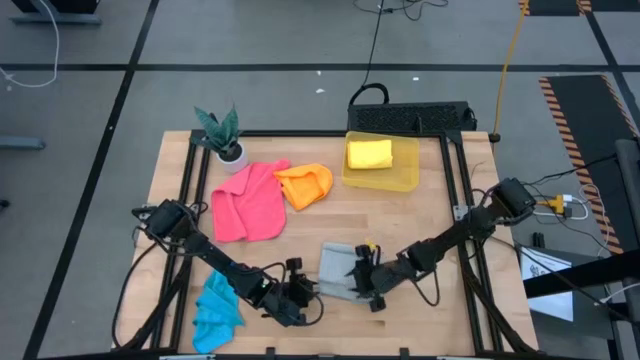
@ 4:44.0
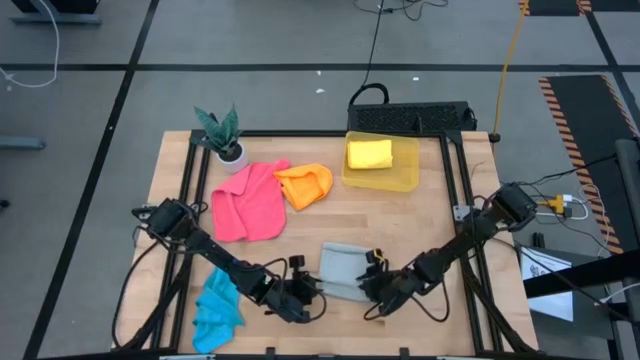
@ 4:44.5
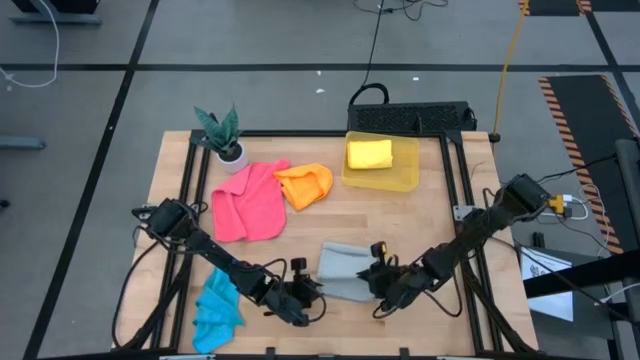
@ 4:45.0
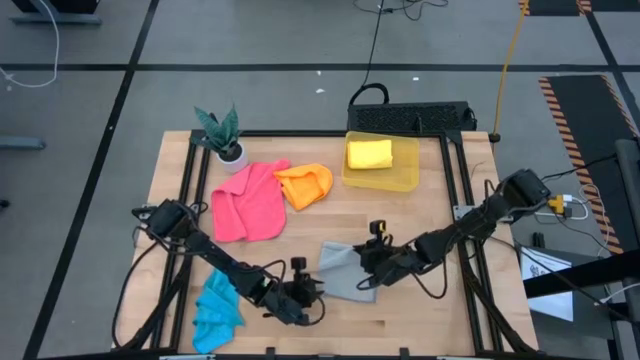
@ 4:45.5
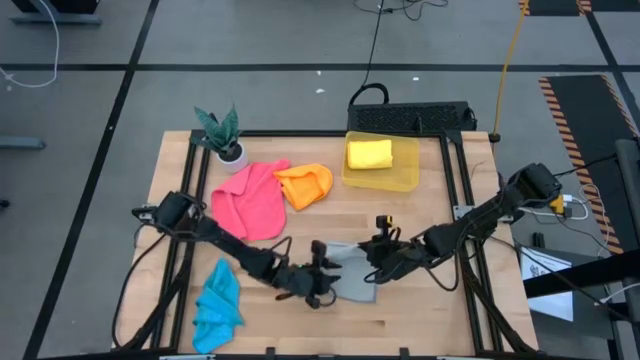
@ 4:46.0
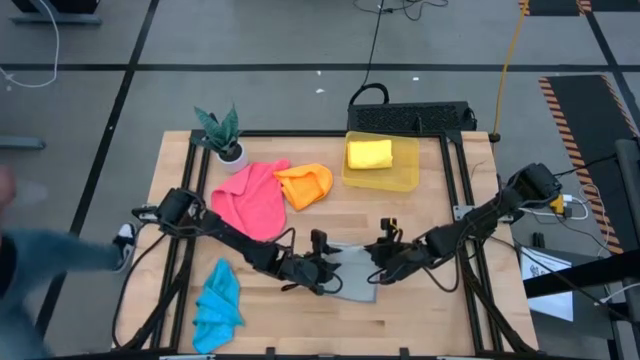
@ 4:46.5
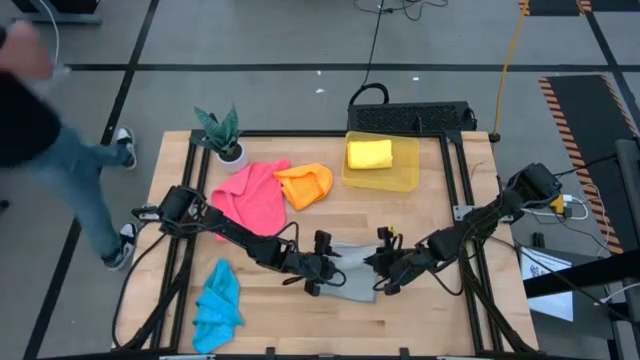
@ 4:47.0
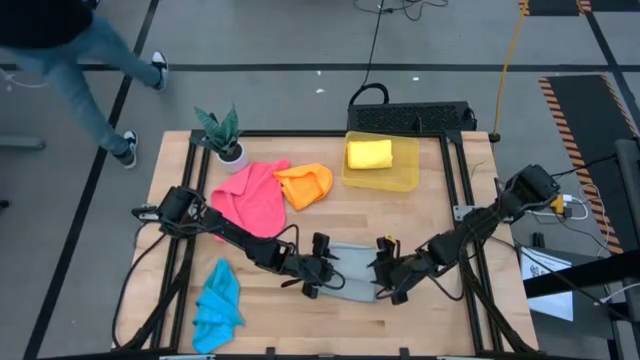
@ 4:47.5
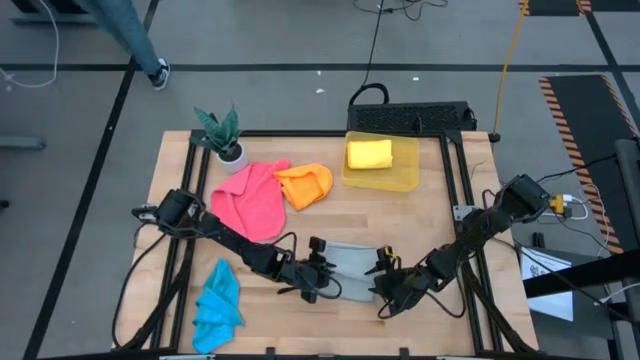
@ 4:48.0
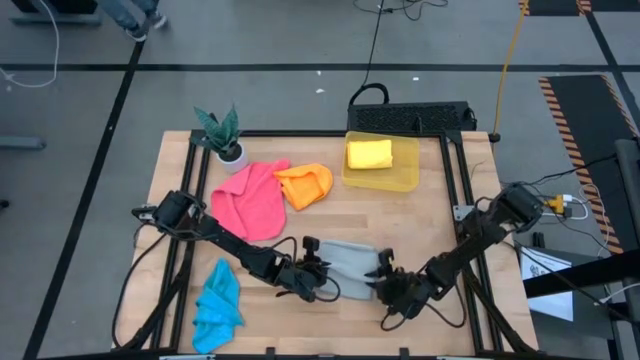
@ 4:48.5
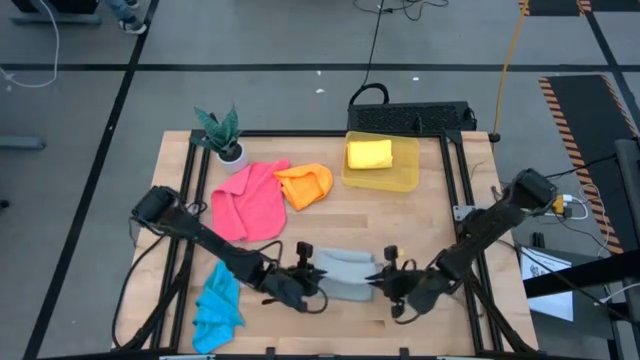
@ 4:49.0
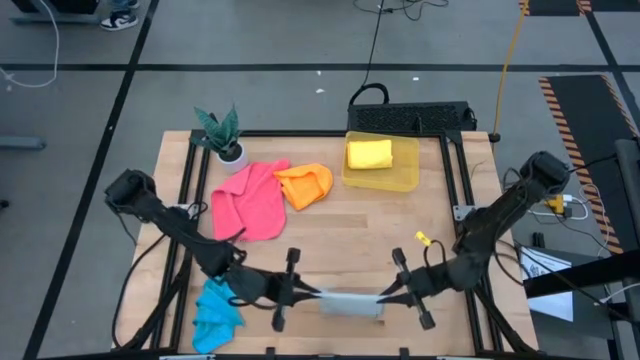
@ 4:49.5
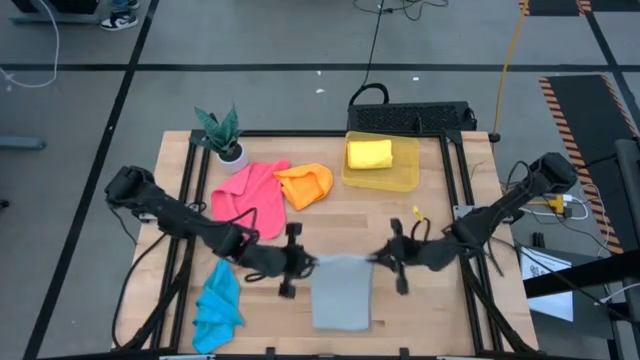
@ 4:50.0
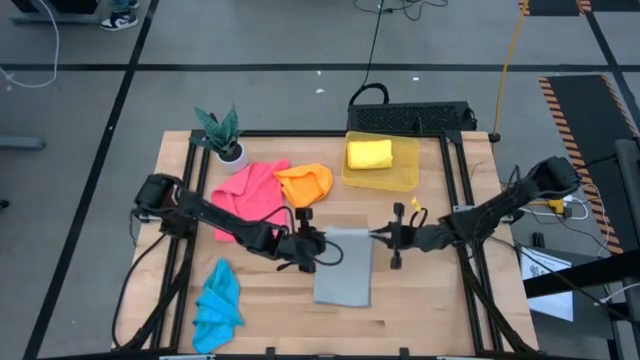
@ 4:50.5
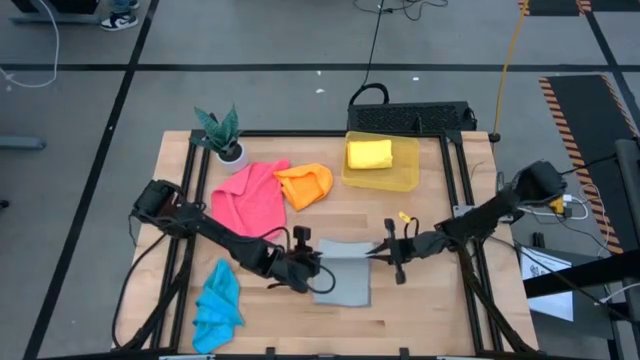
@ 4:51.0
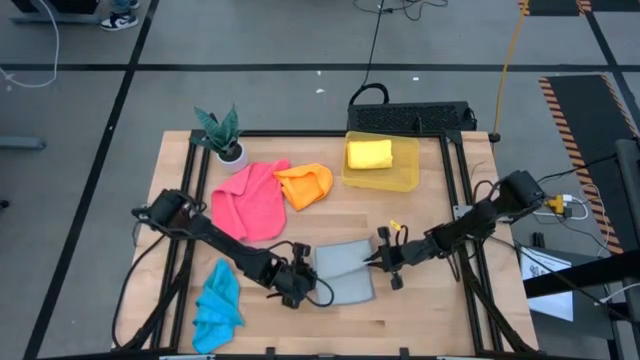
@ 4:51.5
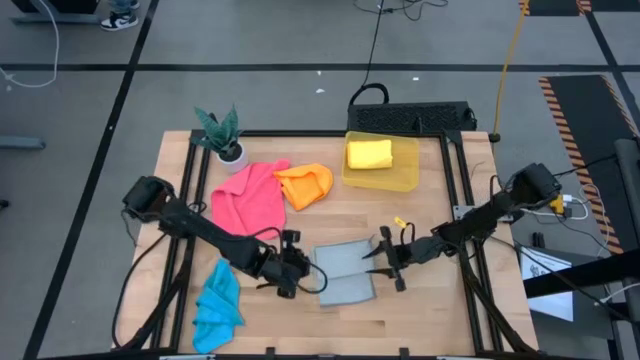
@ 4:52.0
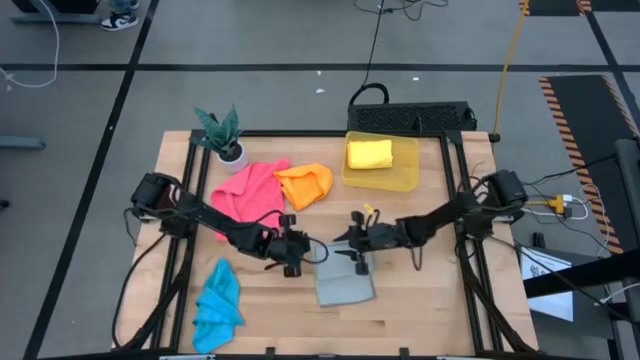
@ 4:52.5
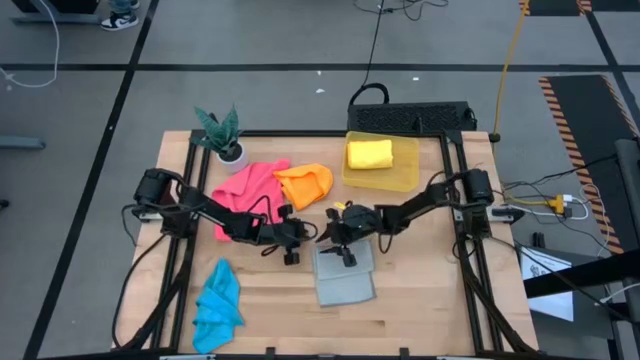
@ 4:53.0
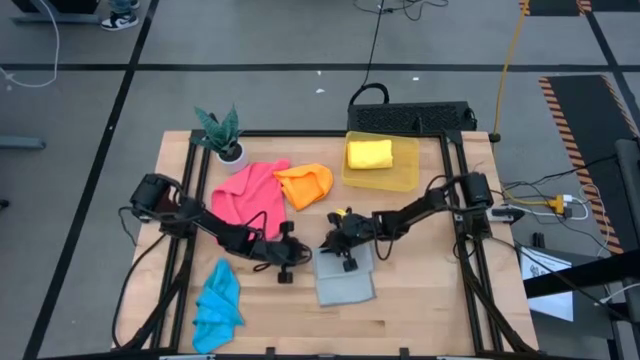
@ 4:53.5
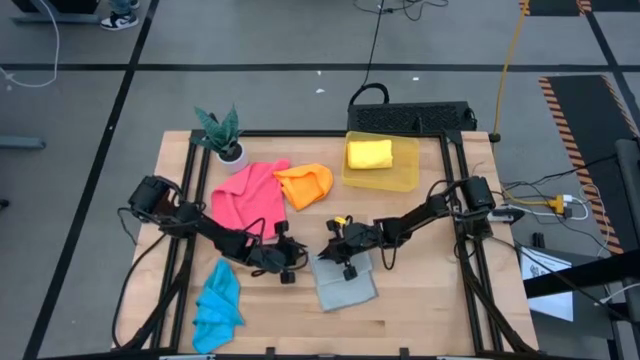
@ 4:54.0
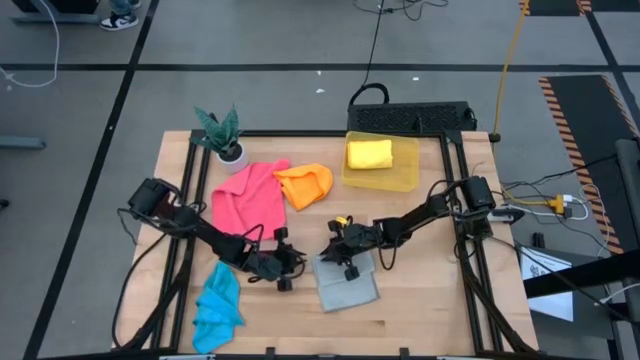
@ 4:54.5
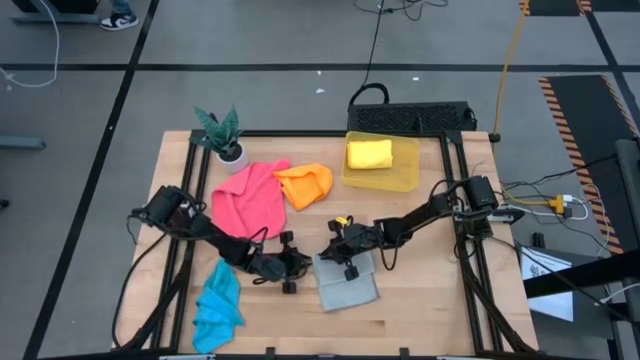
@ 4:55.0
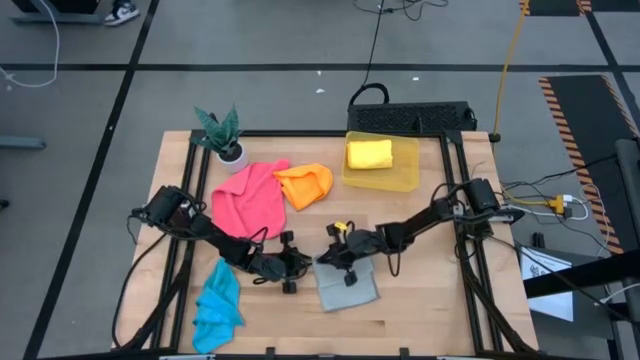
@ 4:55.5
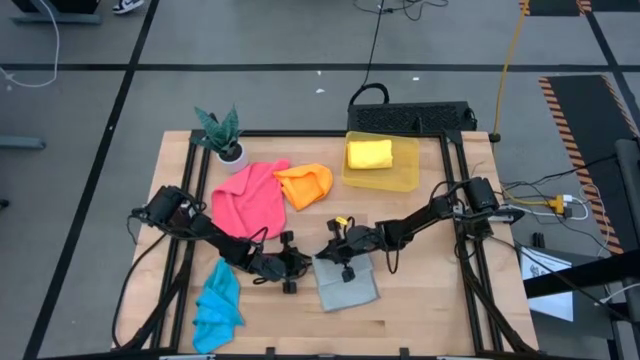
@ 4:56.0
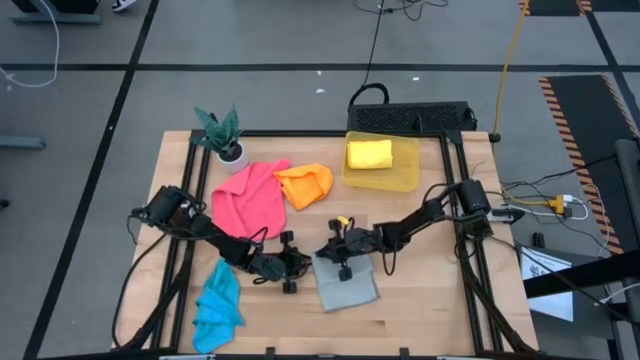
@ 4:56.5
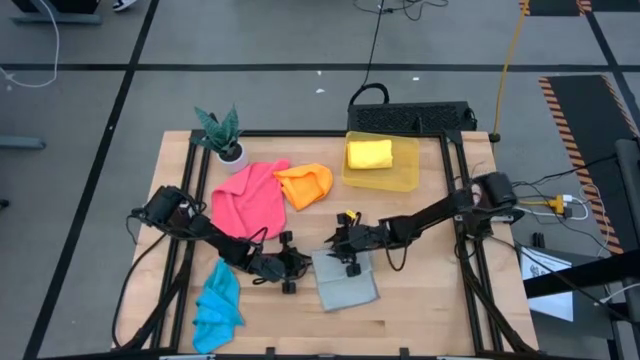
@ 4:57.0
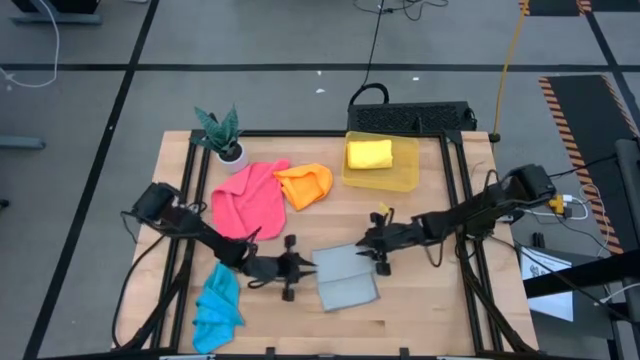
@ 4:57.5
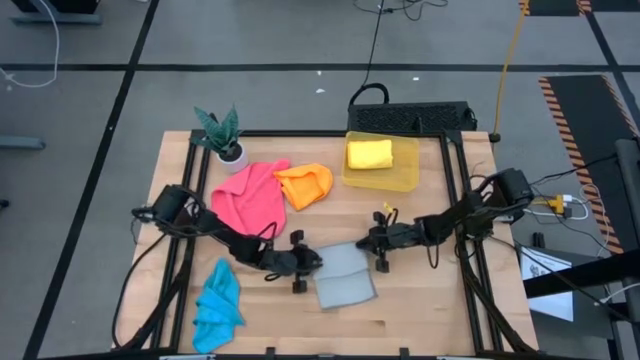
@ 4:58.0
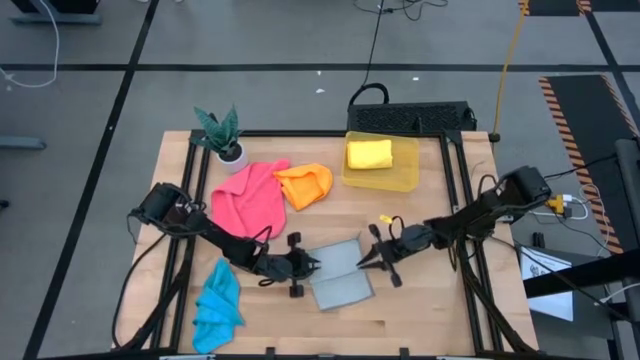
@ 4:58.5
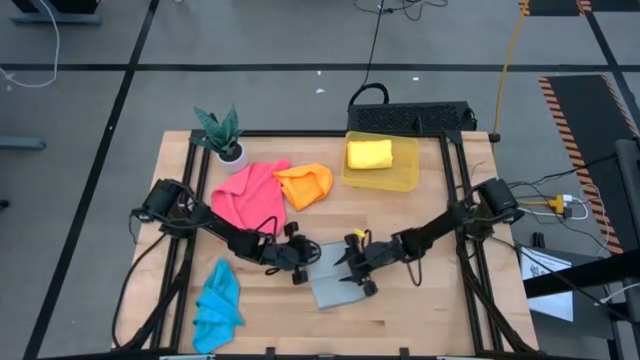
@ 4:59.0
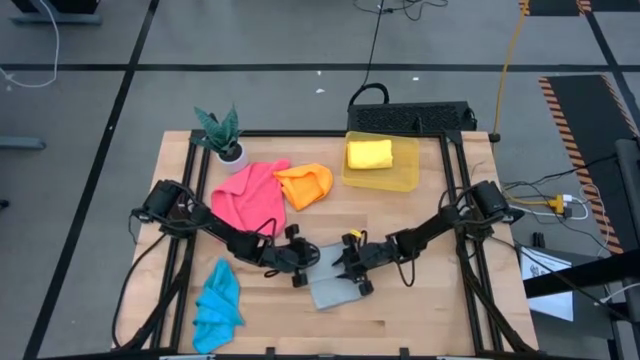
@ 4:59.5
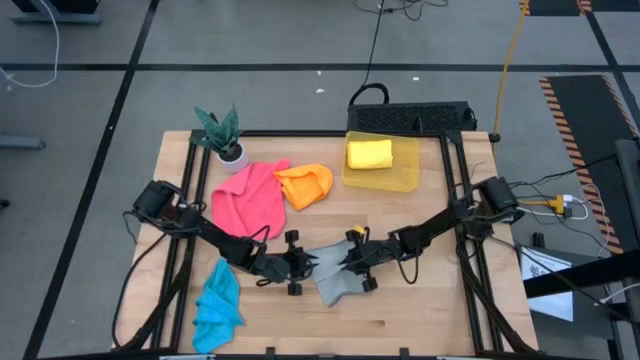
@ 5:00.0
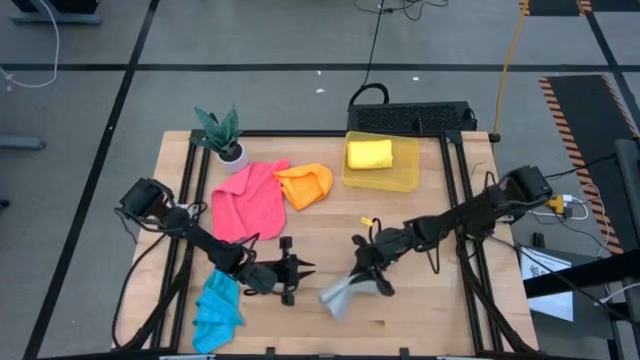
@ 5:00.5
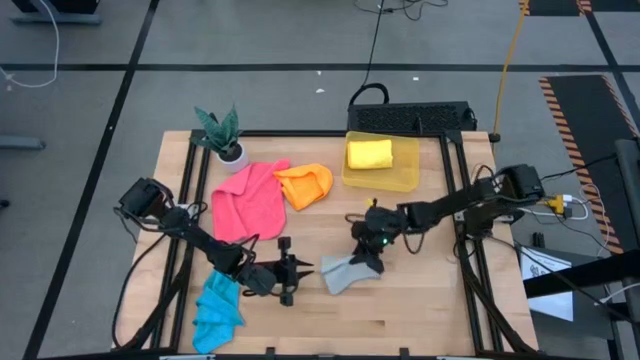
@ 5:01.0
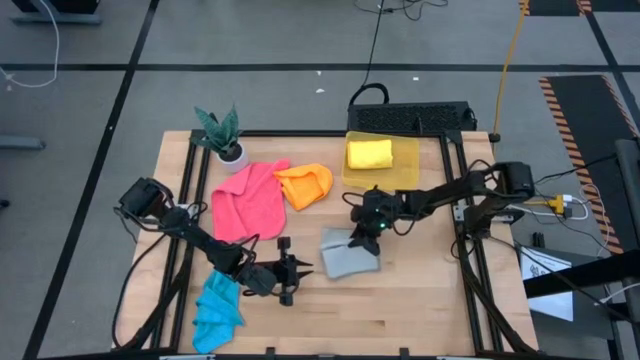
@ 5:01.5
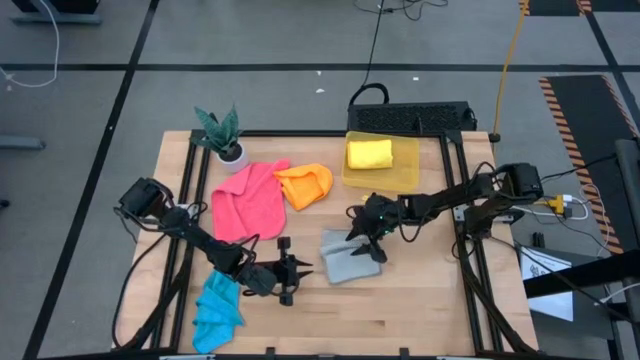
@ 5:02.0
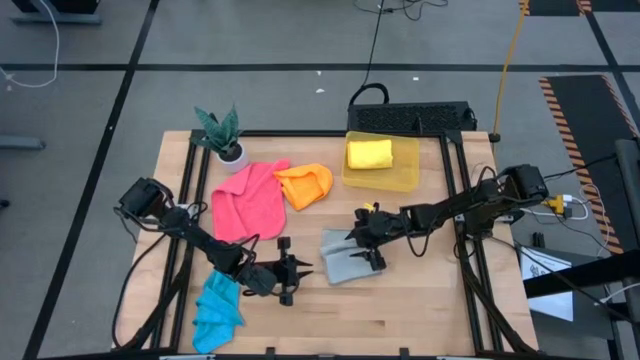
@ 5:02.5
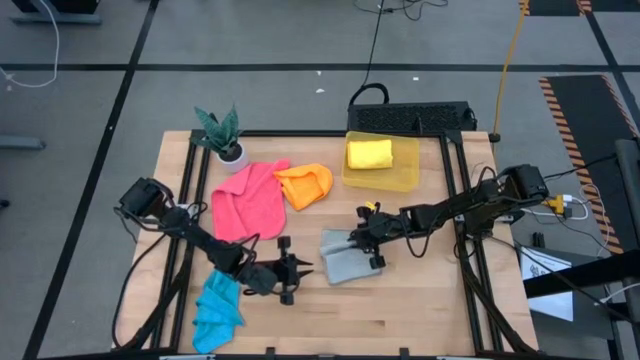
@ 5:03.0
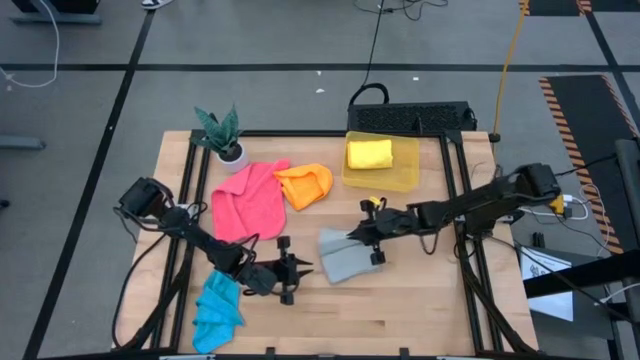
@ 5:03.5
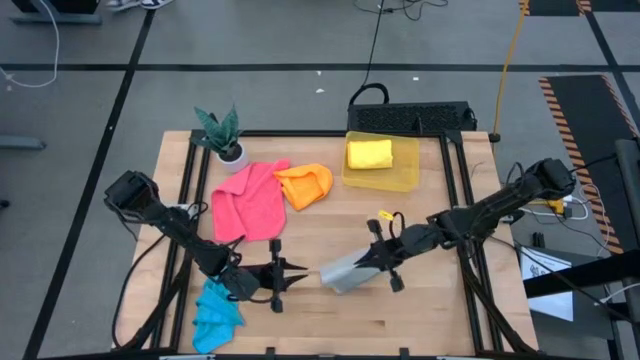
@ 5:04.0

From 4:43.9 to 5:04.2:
Task: Fold microfiber towels
Fold the gray kitchen towel
